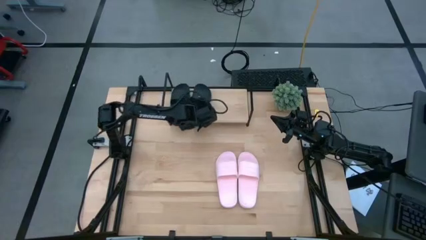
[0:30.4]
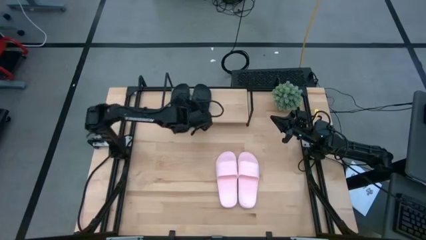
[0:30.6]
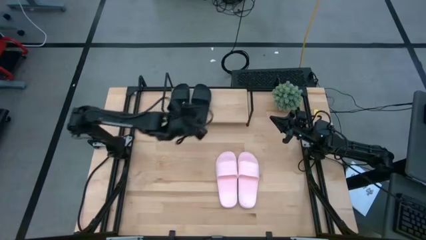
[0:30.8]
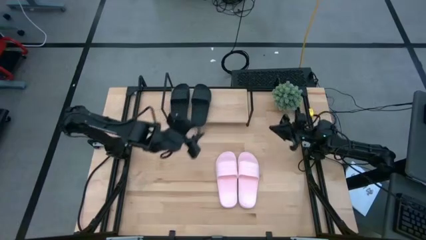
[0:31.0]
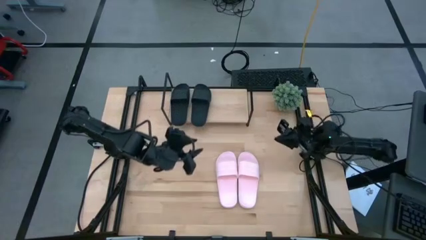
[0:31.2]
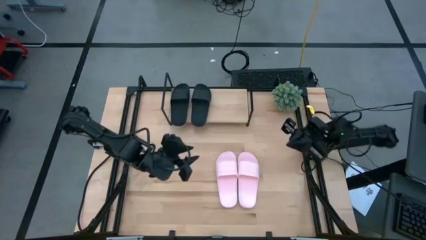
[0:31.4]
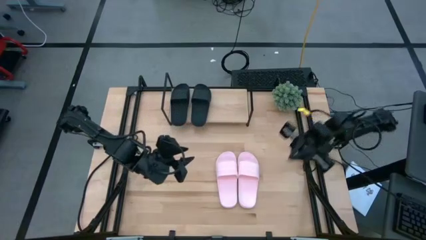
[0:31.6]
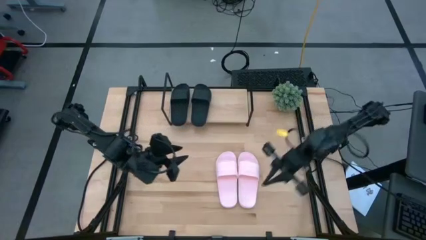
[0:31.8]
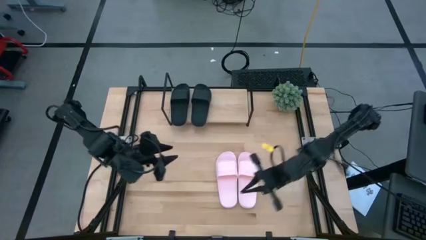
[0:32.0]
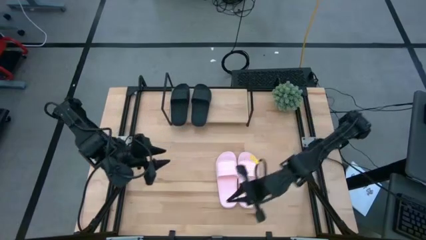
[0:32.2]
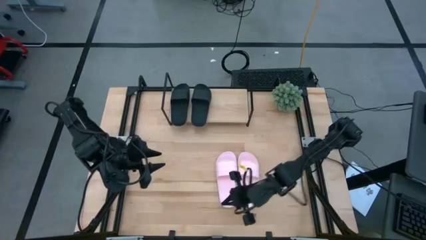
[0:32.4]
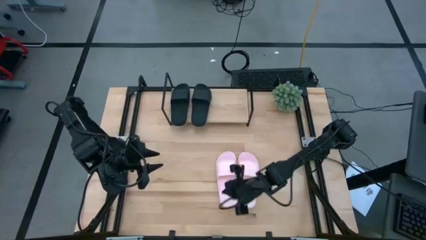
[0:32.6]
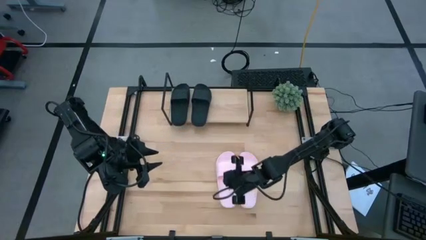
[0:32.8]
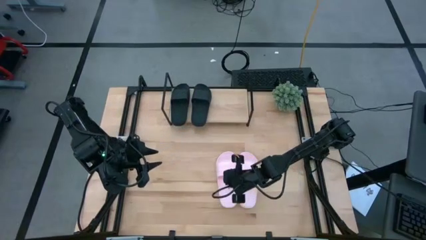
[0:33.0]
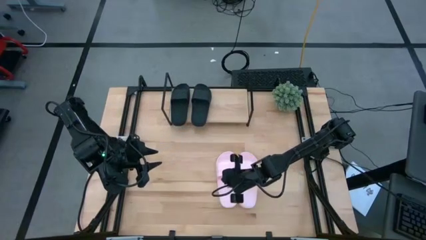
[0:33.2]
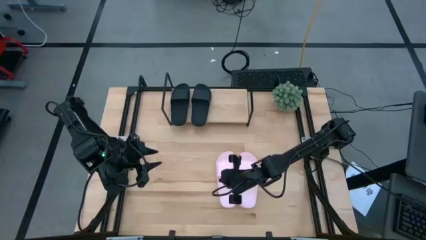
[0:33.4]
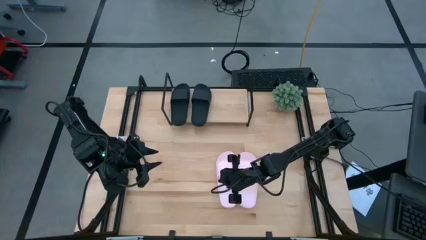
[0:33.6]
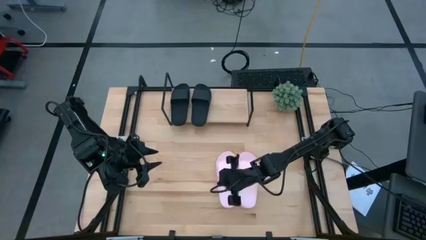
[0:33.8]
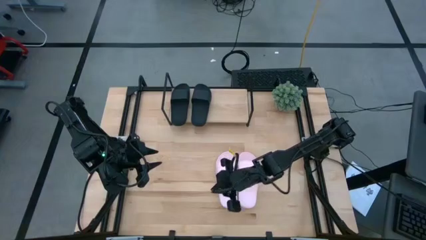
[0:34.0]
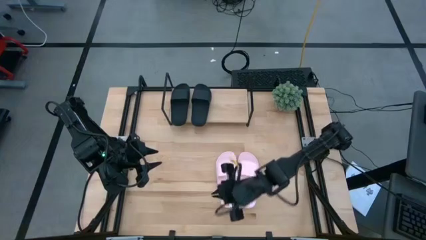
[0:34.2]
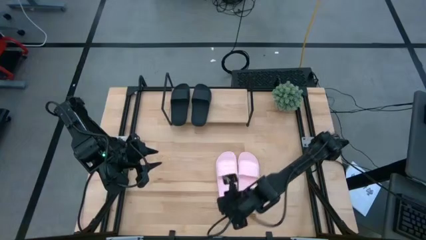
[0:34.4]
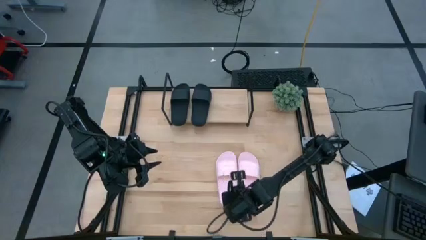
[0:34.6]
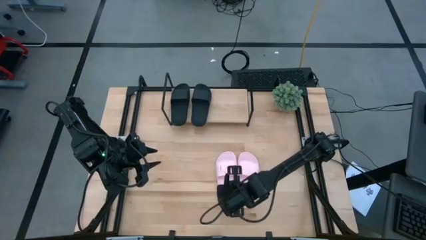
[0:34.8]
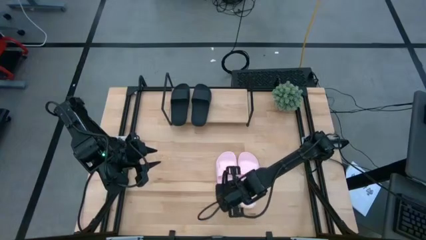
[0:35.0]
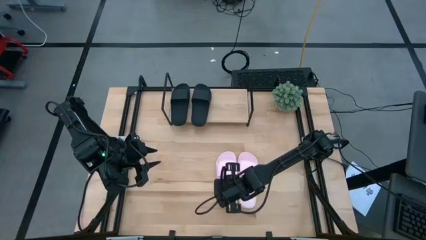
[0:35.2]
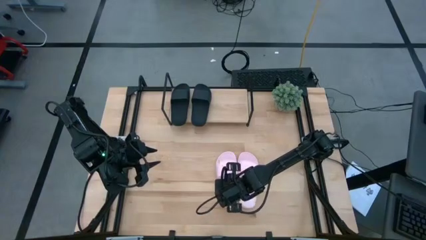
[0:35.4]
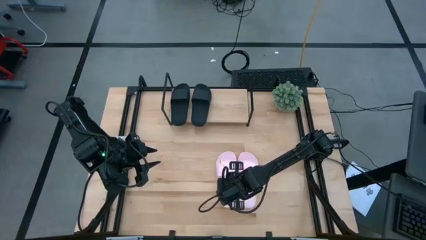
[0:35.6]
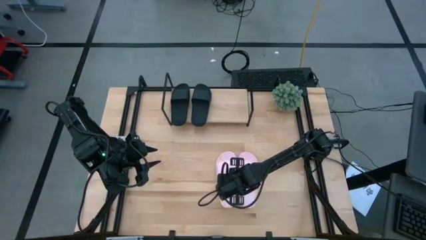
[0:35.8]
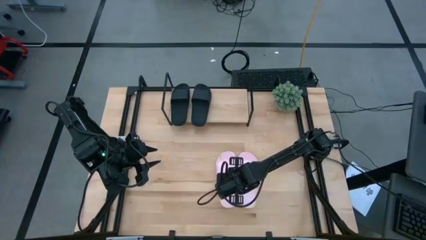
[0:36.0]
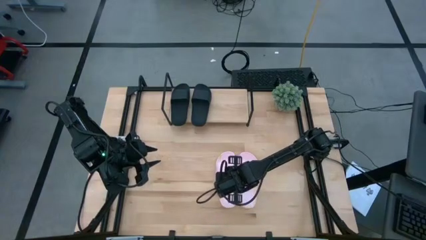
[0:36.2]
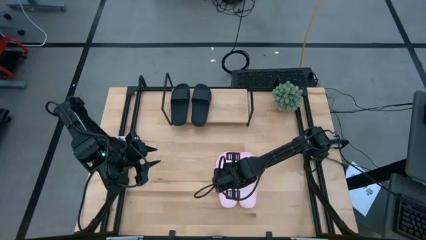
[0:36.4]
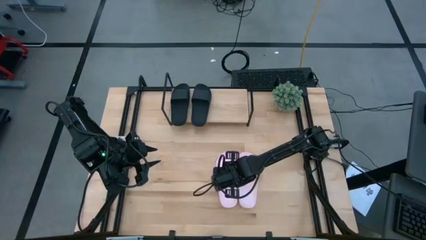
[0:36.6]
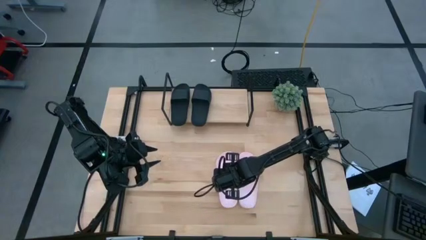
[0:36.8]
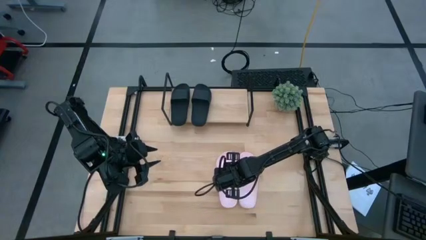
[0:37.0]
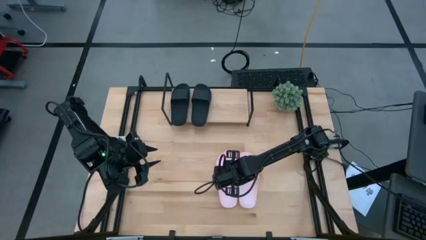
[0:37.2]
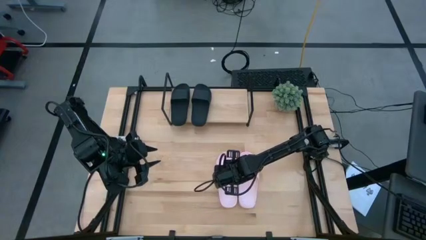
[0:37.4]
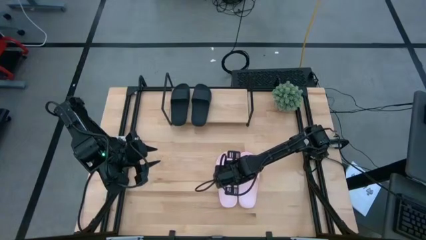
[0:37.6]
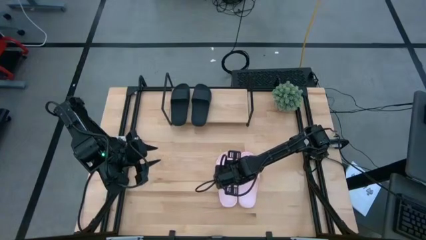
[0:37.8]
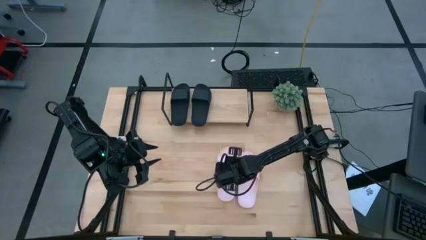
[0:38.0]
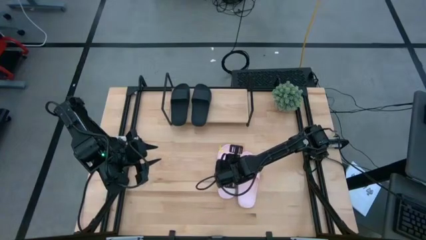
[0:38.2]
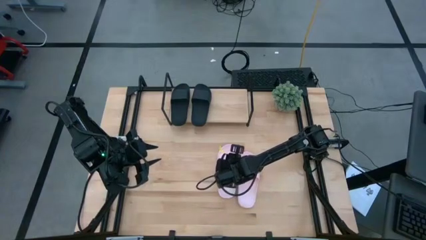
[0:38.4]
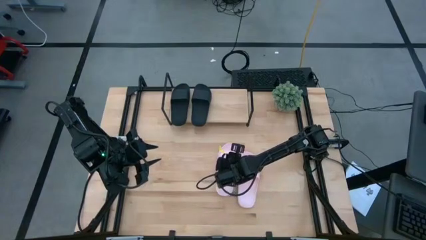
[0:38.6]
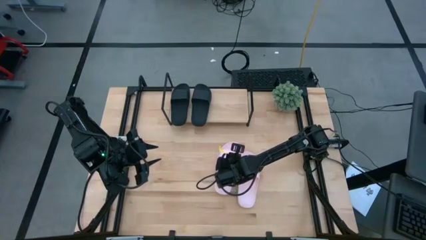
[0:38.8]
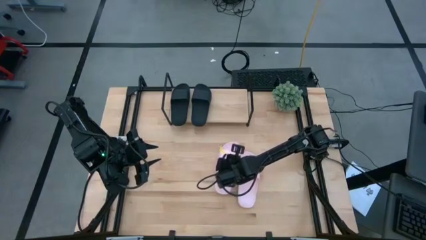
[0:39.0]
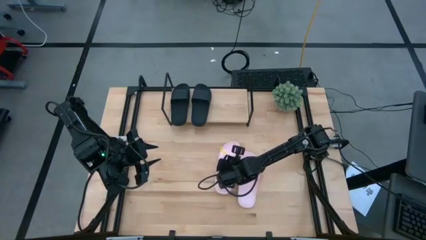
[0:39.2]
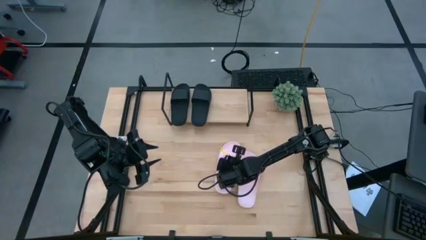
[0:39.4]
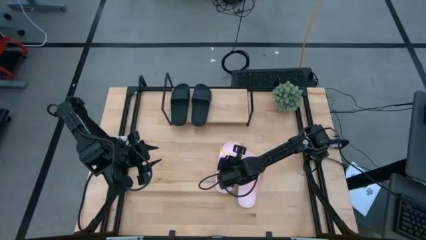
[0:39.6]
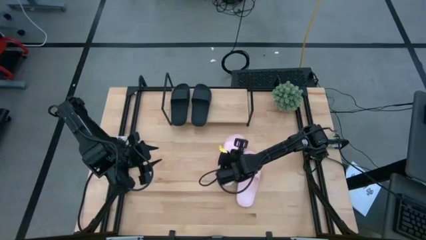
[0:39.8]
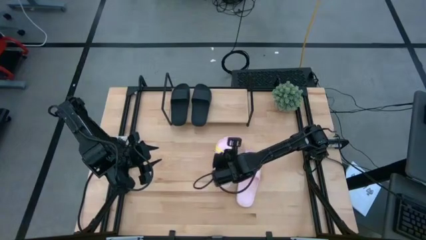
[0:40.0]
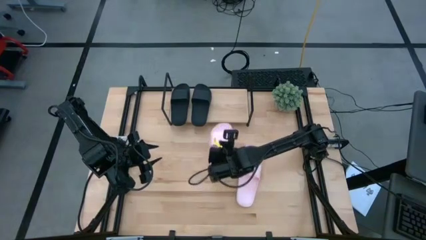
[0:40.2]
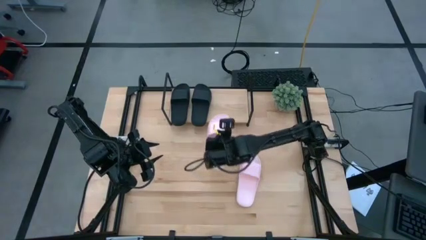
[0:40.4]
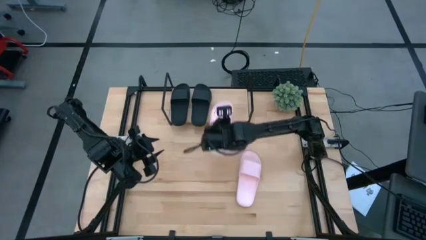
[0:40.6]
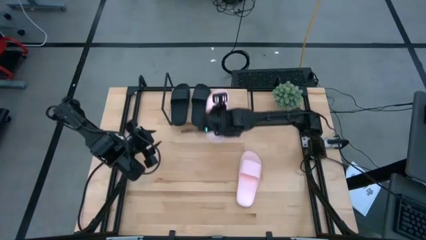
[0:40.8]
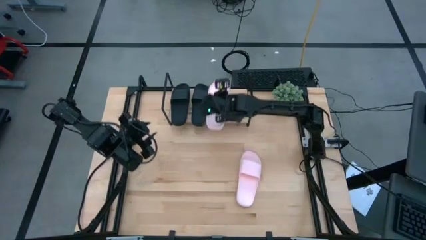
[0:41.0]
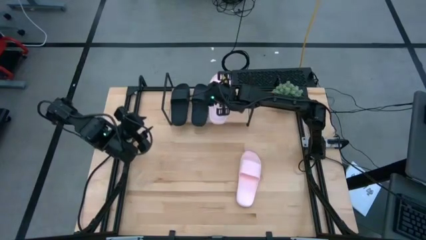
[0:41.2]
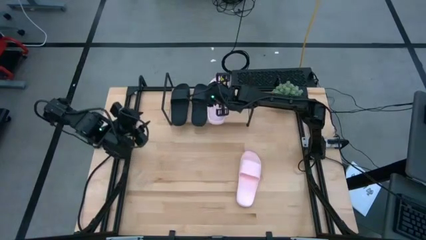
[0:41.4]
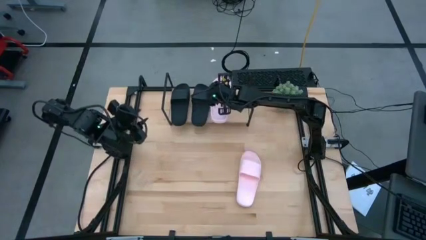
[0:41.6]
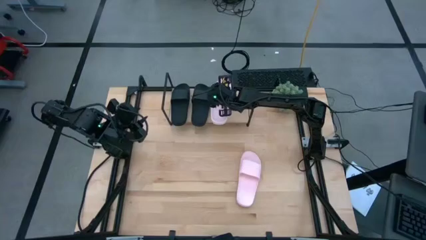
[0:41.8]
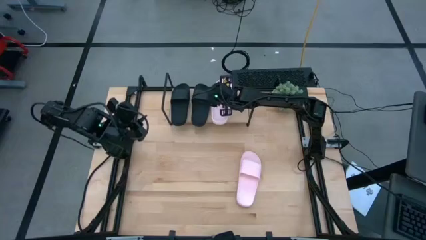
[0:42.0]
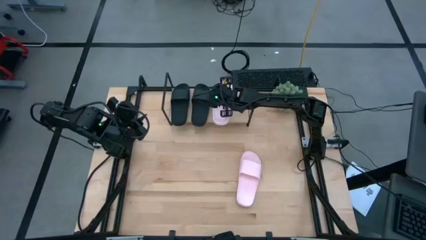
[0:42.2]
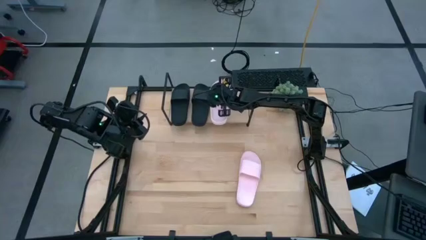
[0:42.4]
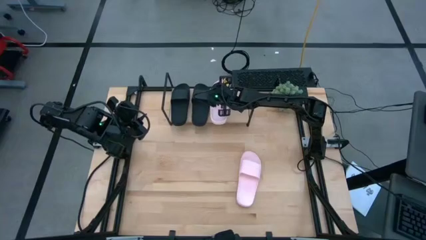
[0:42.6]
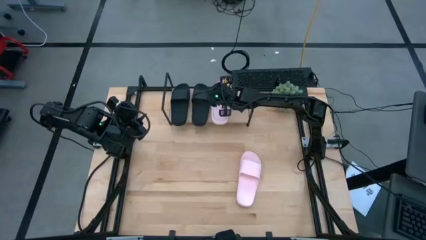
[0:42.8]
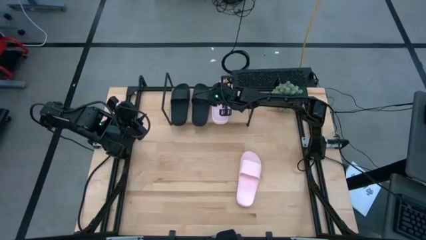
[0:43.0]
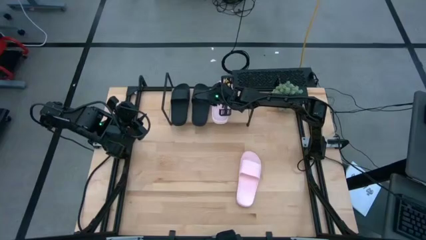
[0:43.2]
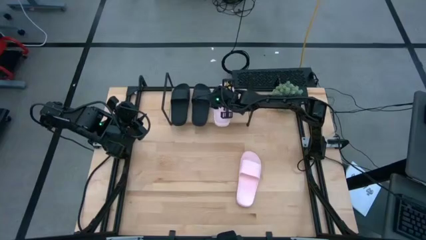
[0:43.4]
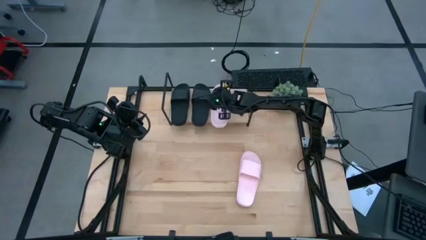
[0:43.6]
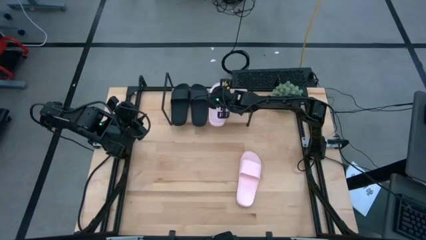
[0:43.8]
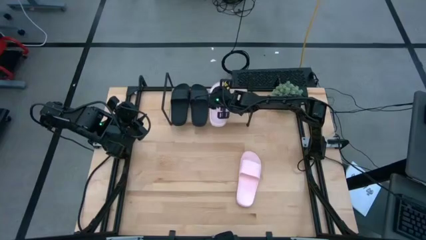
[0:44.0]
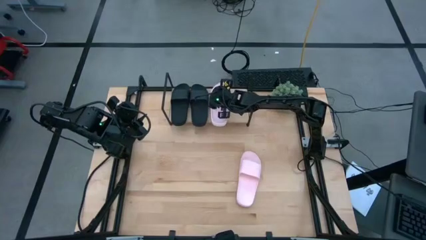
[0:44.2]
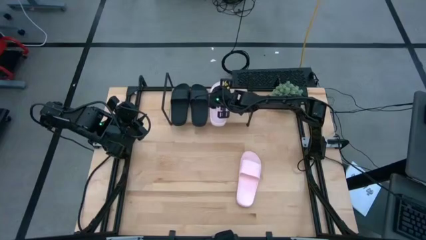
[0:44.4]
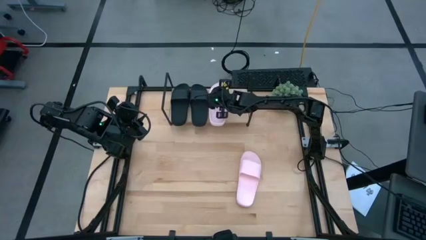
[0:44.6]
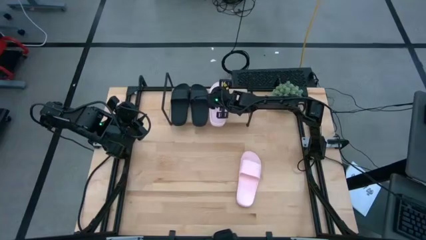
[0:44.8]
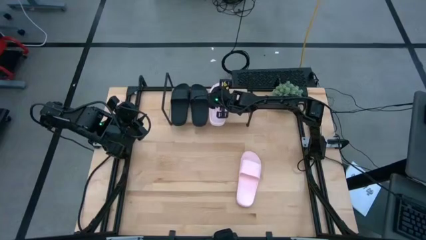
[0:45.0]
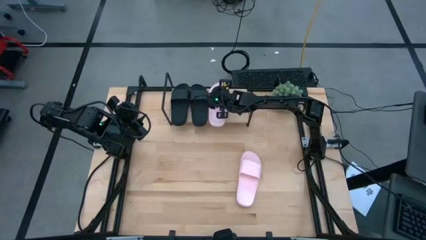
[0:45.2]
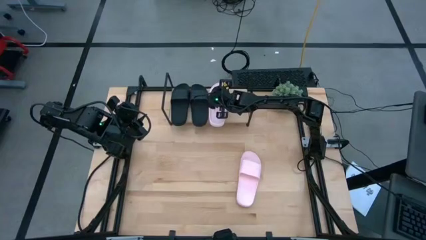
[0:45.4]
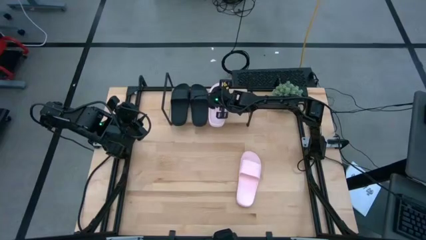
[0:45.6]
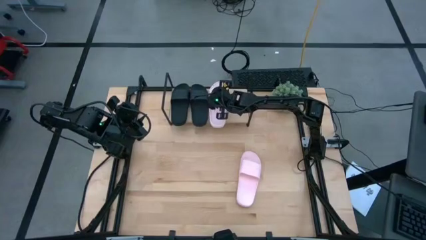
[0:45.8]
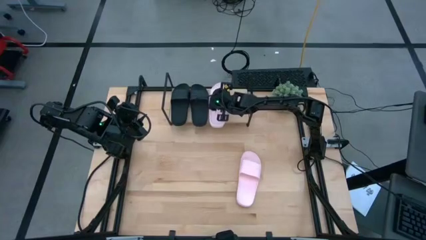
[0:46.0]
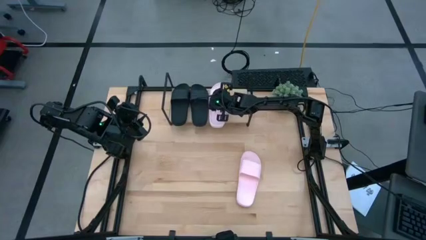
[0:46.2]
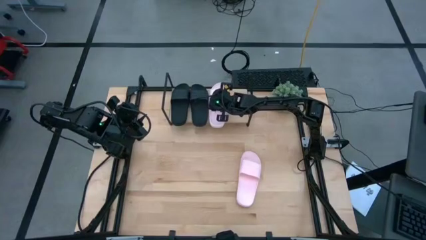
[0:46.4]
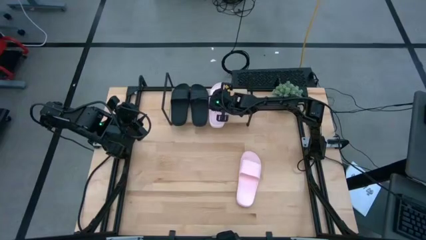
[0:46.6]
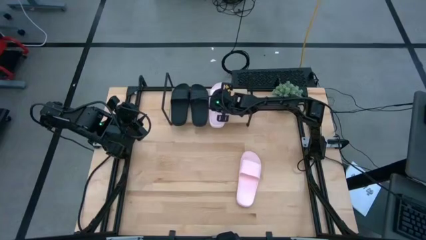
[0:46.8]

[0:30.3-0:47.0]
Task: Pick and place slides into the shelf
Put the left pink slipper on the shelf
